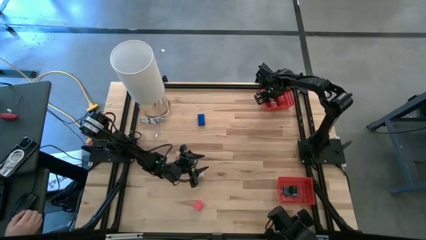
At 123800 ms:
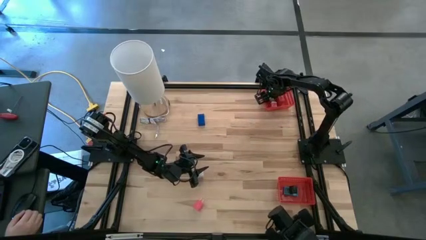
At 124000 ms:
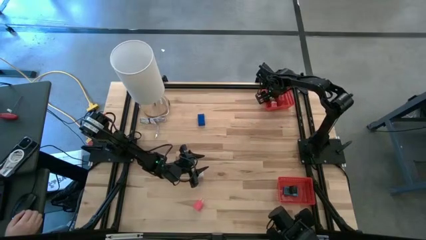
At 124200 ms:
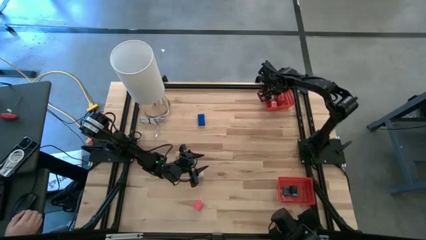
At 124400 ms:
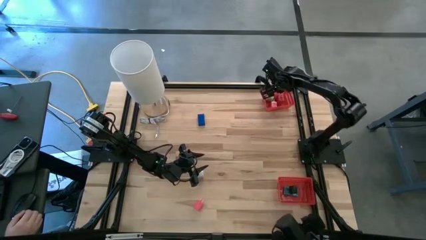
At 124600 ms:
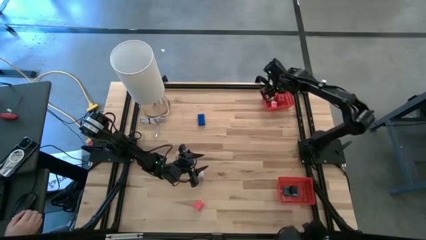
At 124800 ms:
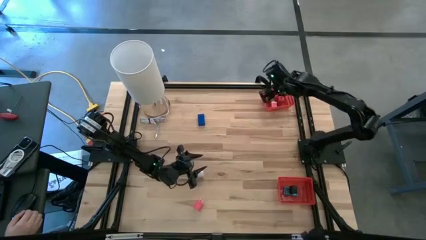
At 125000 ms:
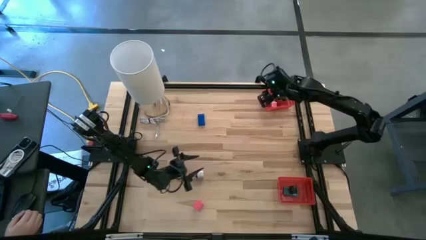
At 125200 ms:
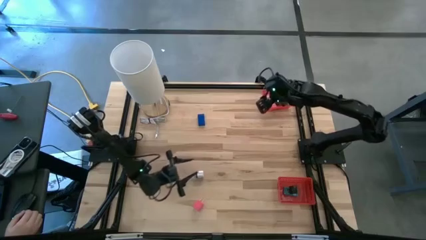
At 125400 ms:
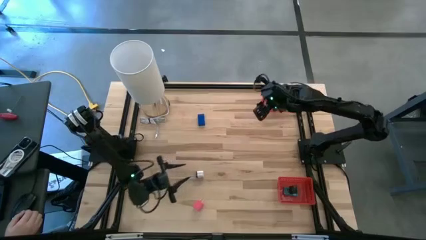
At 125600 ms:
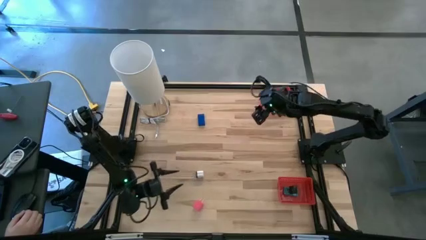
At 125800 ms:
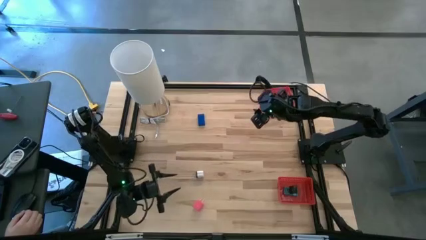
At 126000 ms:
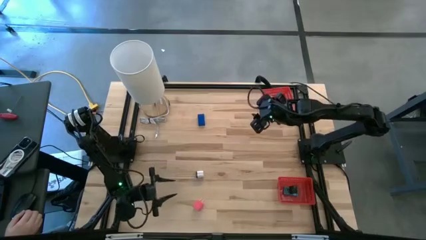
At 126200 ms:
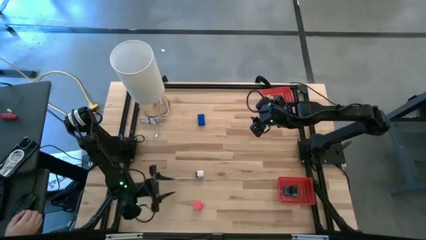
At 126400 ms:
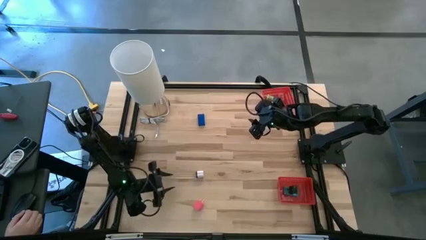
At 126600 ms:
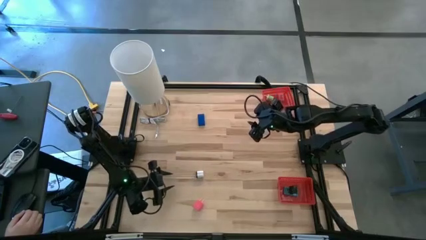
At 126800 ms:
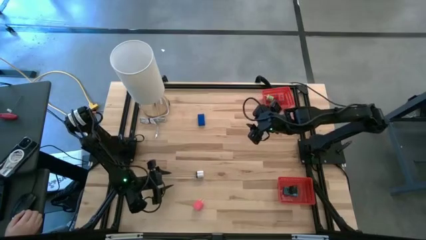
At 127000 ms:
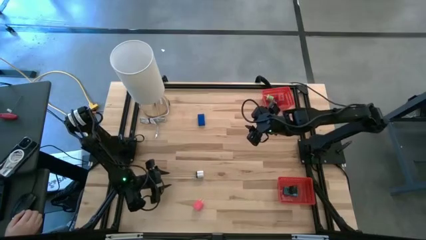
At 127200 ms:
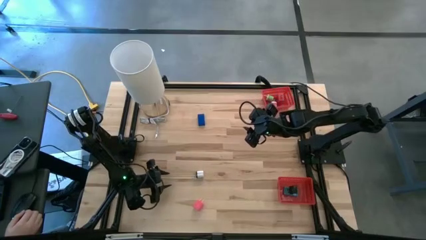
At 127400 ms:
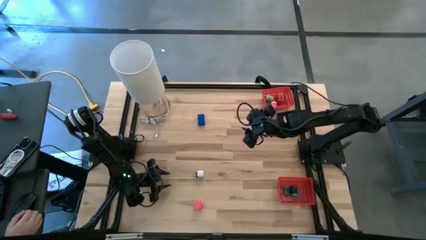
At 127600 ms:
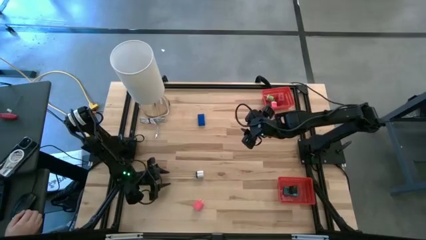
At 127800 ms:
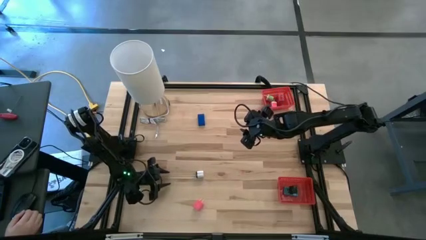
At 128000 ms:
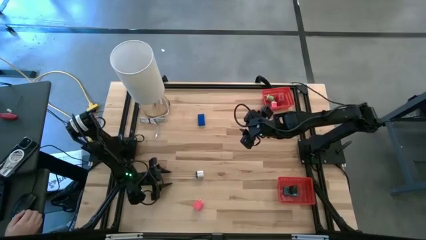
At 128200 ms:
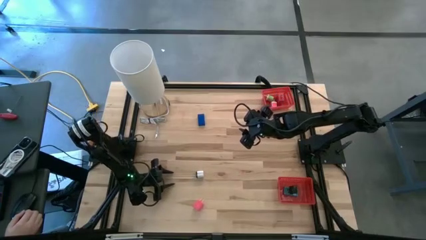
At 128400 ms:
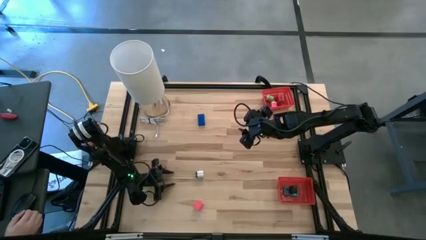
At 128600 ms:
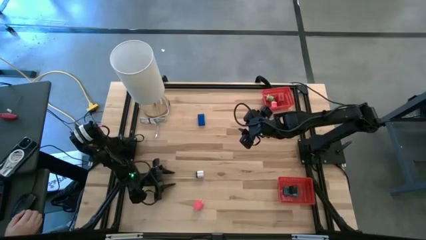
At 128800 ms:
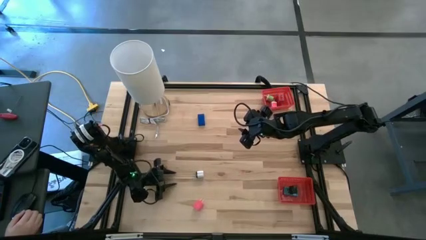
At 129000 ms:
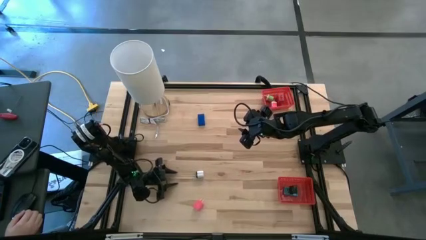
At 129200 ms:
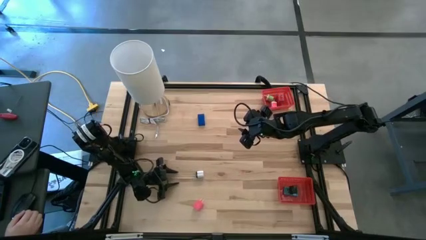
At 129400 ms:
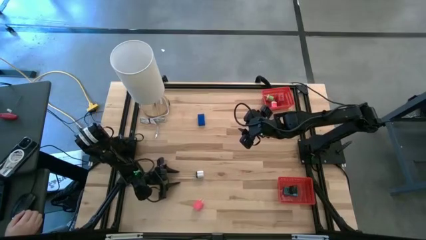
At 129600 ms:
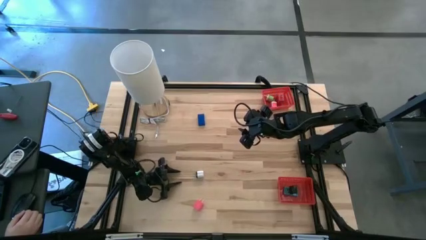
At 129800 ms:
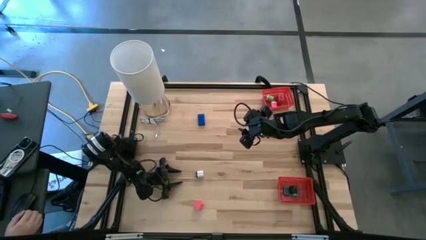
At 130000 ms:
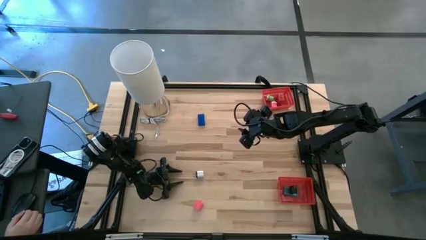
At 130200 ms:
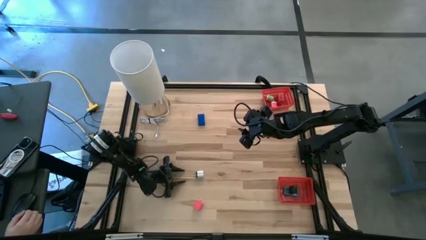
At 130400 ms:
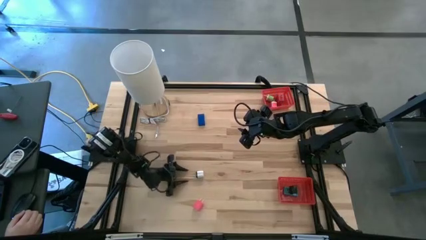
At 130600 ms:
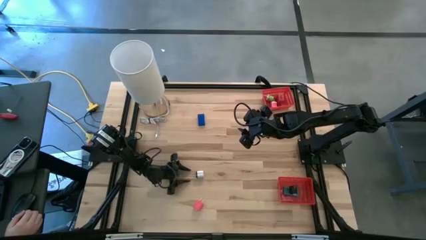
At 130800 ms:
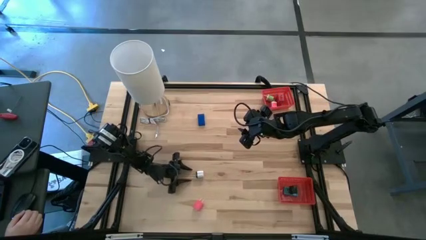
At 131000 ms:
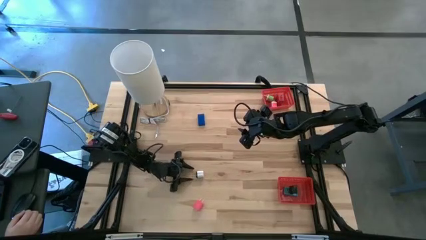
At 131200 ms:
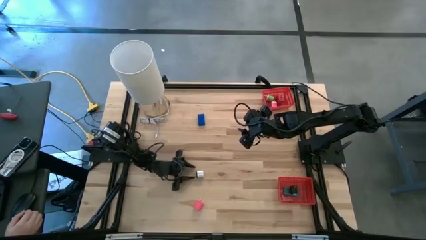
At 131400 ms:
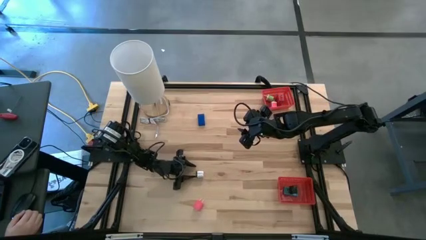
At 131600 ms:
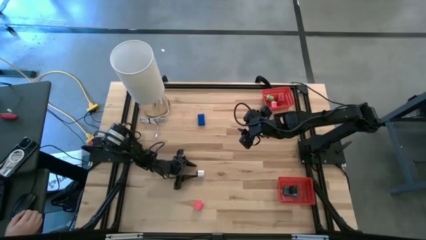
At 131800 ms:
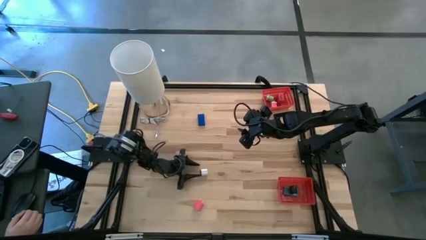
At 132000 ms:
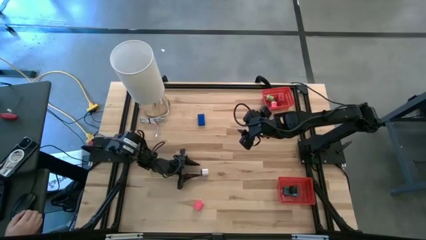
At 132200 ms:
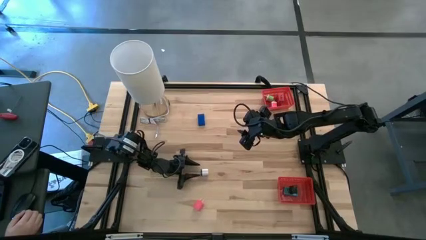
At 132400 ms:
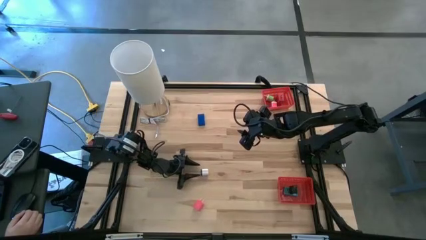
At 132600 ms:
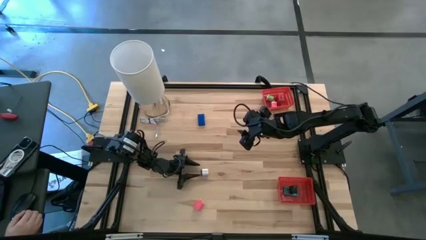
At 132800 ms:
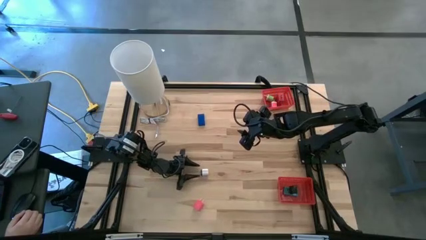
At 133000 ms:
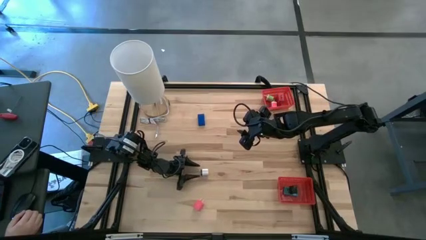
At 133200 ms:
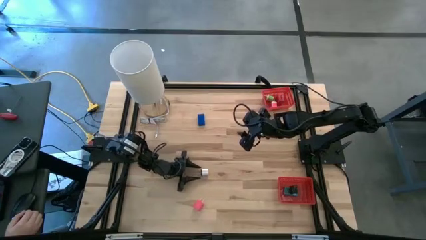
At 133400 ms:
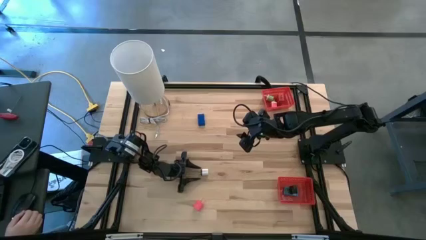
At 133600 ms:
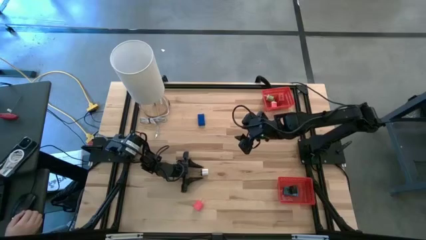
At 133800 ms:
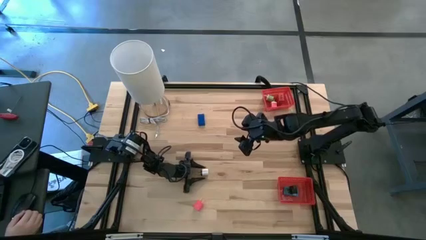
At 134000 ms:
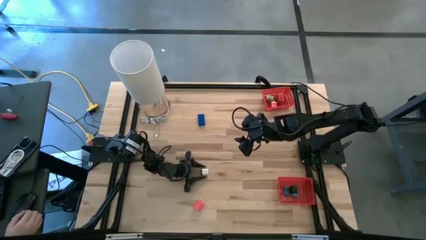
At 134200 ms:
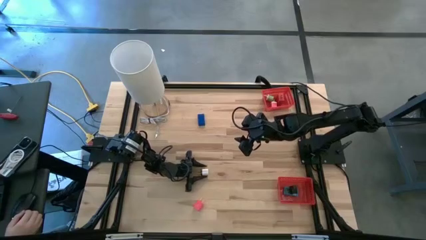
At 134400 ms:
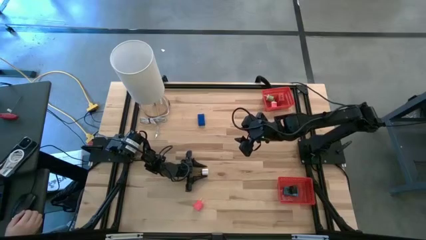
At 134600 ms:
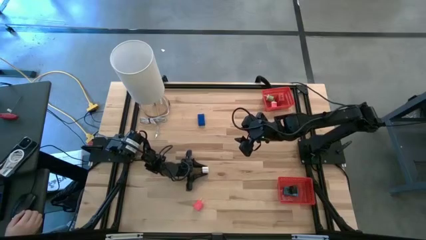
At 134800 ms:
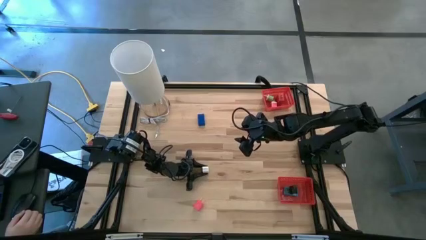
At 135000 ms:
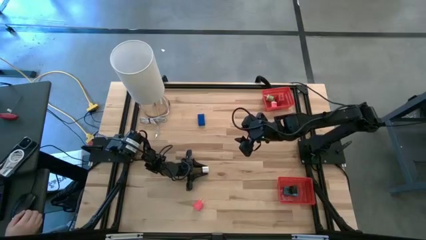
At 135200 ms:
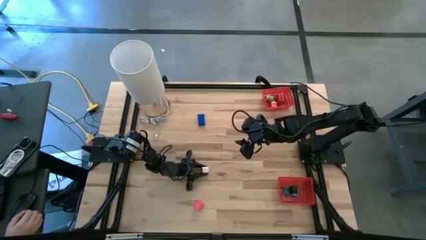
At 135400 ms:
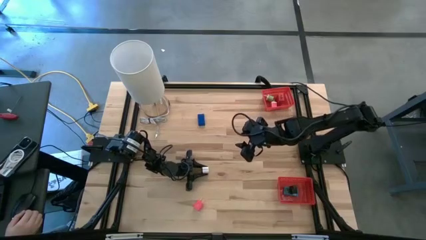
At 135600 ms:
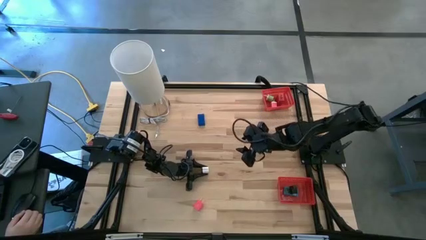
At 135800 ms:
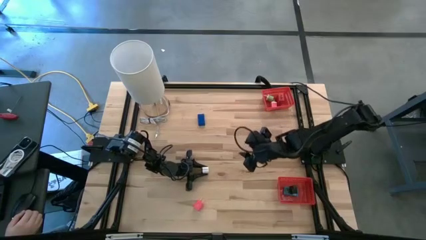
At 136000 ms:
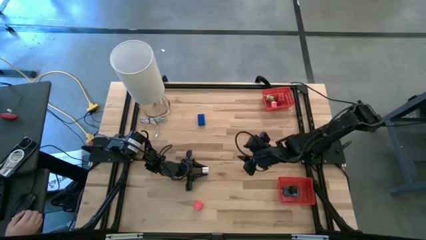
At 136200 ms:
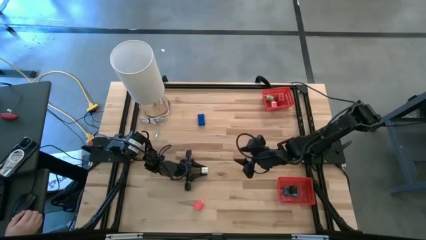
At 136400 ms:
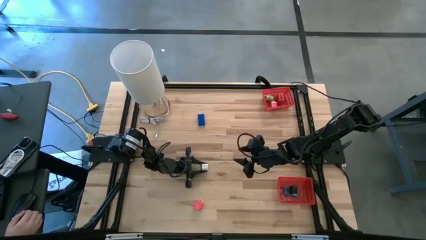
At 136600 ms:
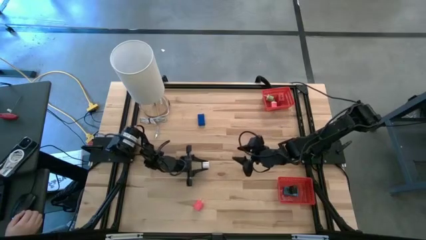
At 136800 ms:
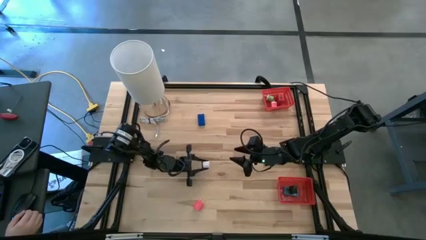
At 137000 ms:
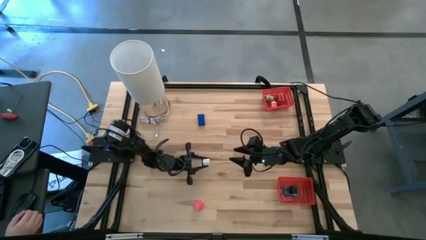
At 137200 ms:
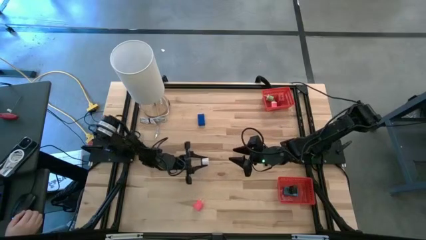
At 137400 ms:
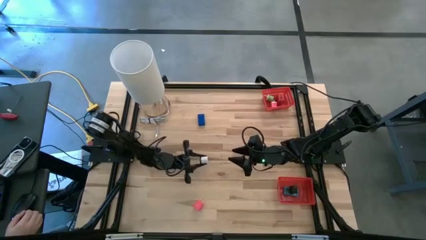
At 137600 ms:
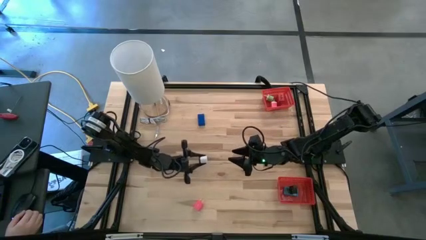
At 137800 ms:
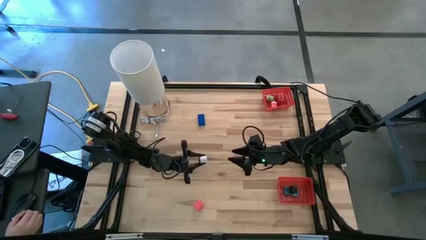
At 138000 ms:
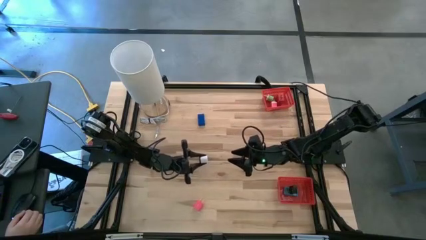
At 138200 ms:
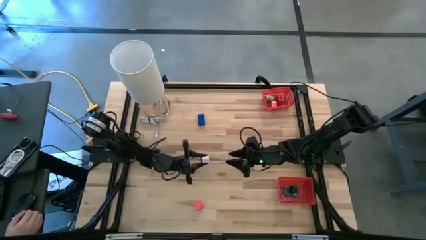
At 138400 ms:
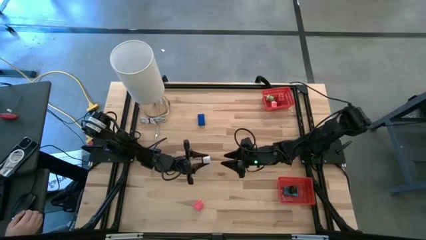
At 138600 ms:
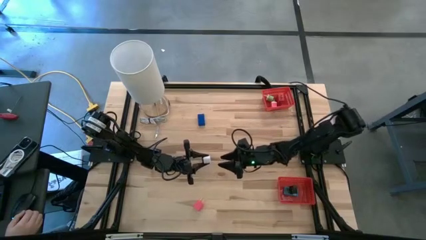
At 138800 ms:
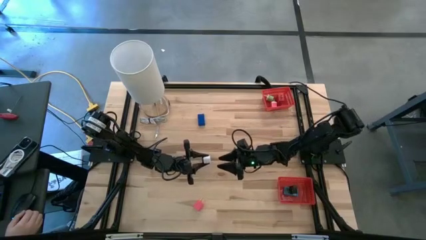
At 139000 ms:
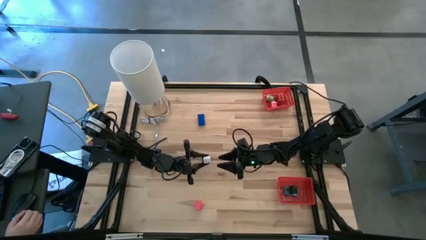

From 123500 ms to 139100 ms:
Task: Pick & Place Office items
Put the white charger adapter into the top red basket
